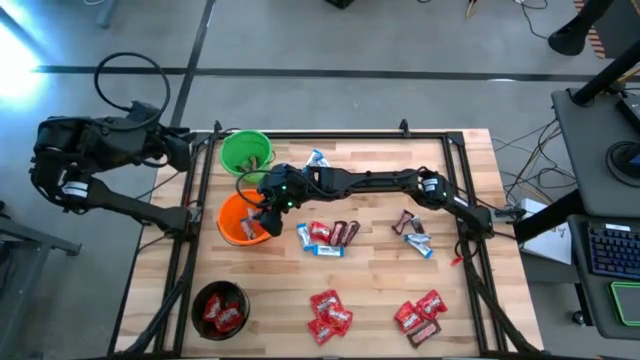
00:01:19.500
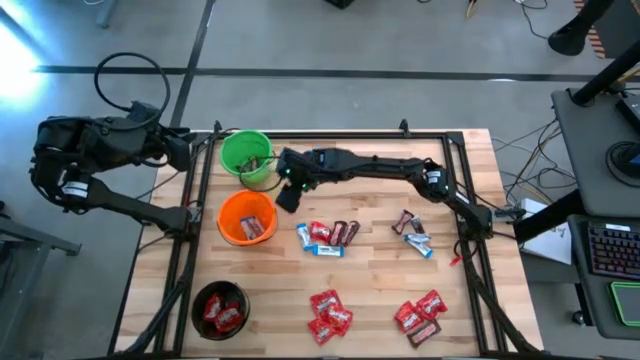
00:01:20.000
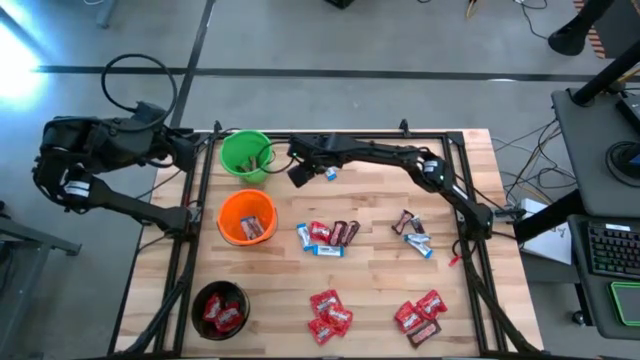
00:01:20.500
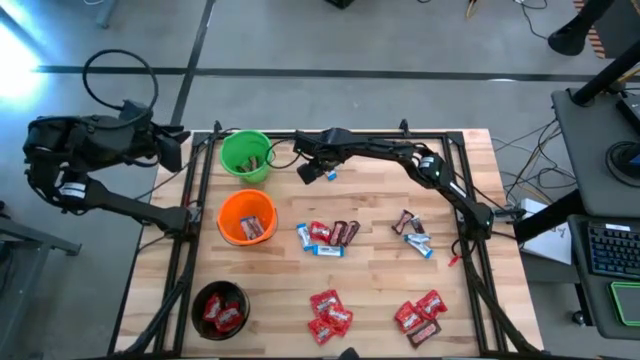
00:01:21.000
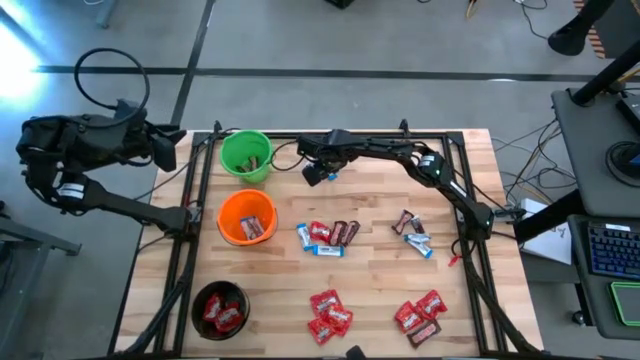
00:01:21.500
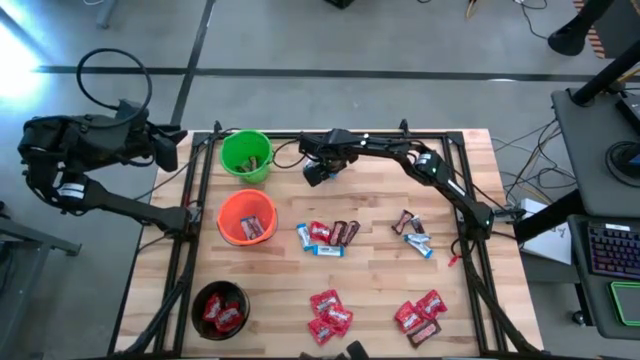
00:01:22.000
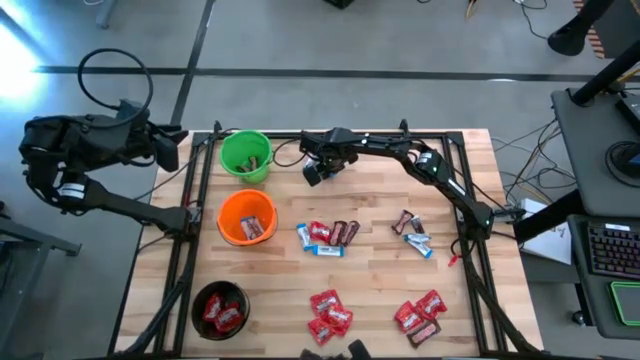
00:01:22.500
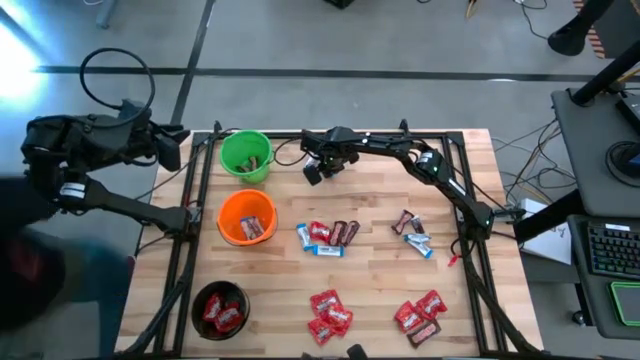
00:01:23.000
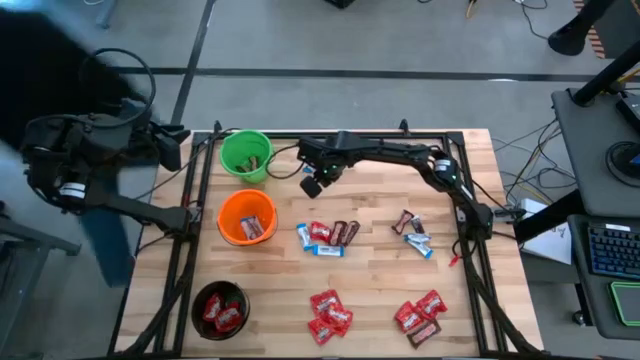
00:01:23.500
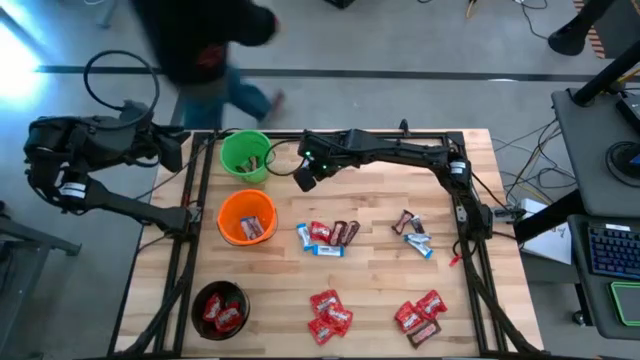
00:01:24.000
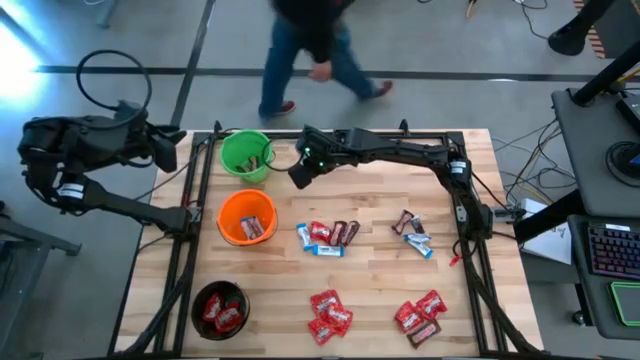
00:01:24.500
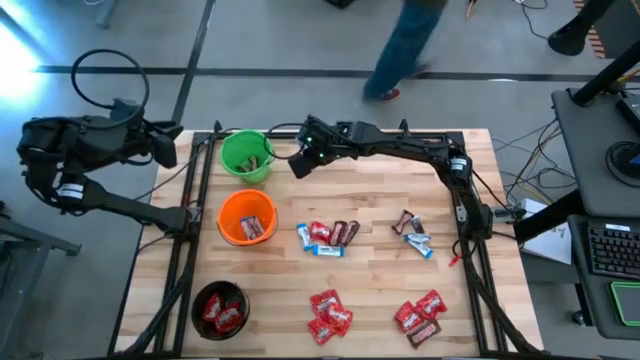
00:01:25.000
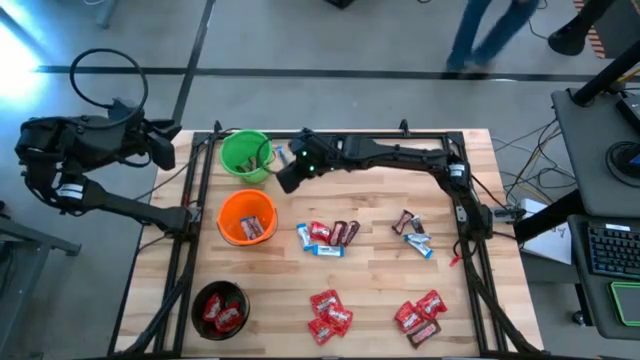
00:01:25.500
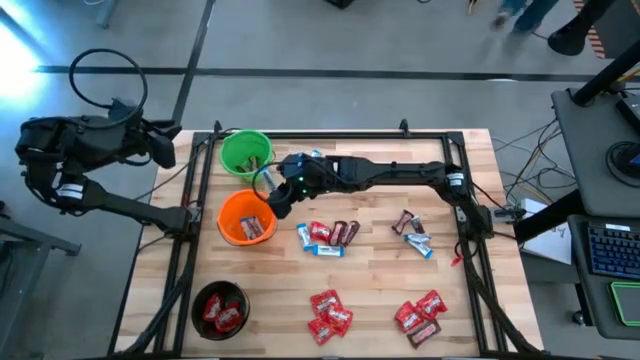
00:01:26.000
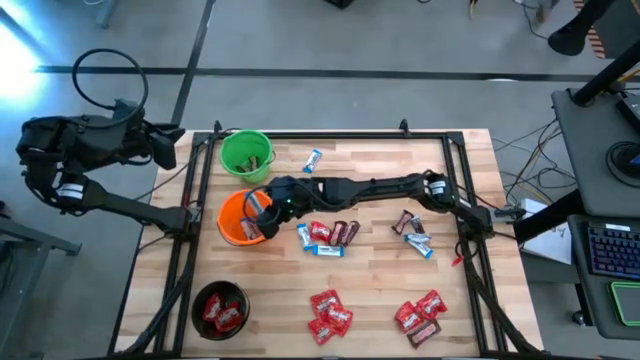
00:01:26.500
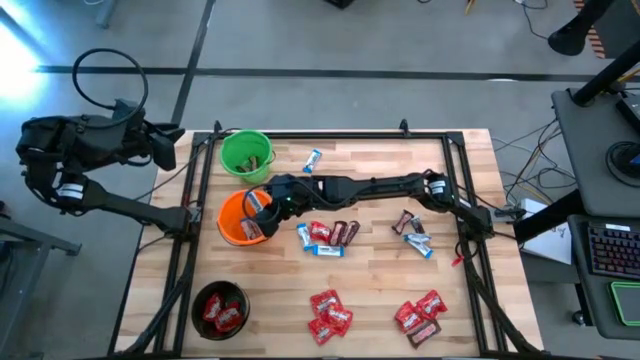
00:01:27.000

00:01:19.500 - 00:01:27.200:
Task: Organize candy in baskets
Put the white chocolate into the orange bucket

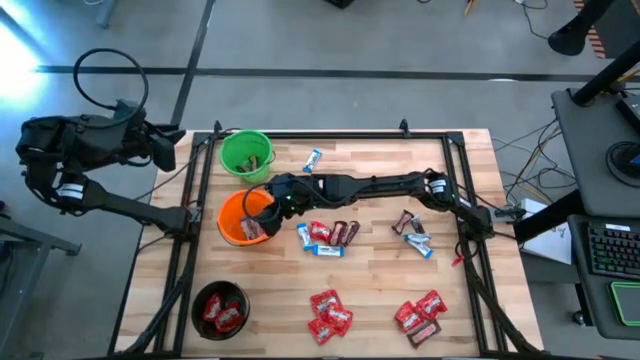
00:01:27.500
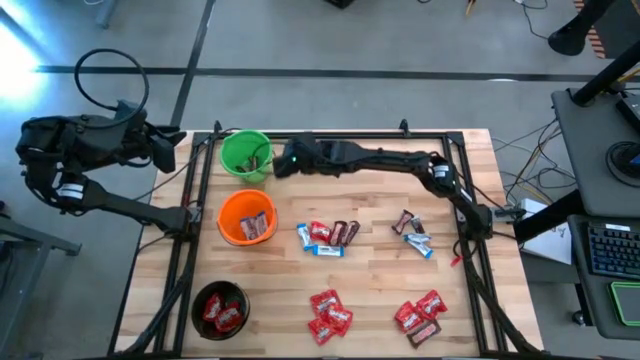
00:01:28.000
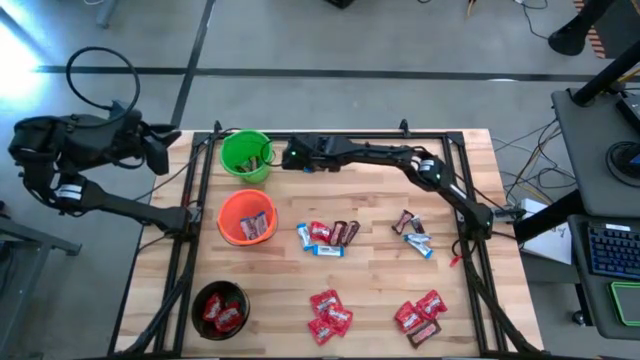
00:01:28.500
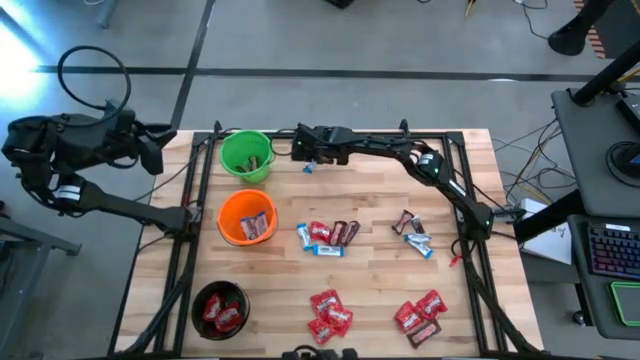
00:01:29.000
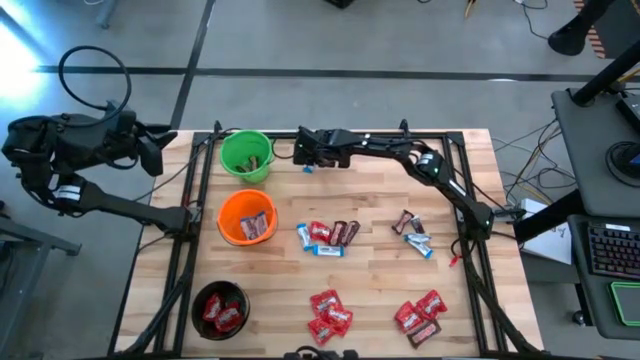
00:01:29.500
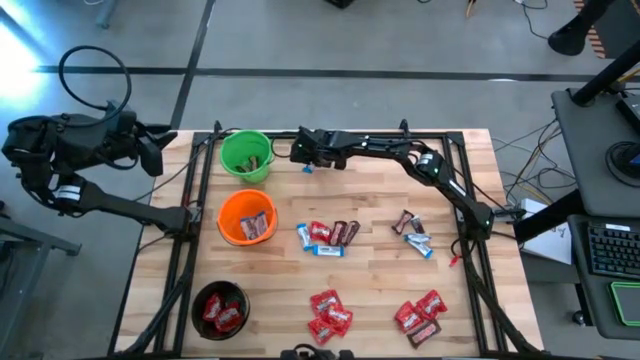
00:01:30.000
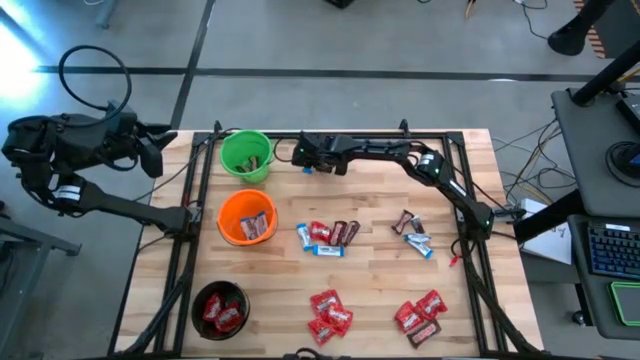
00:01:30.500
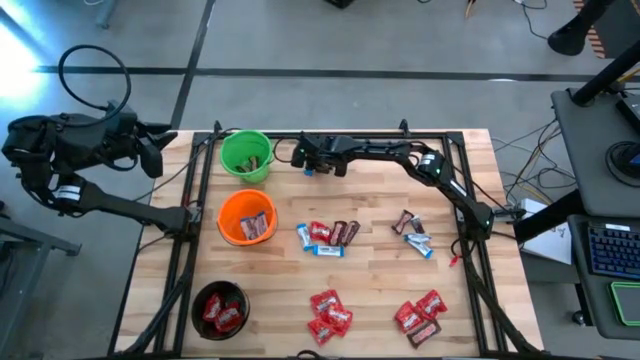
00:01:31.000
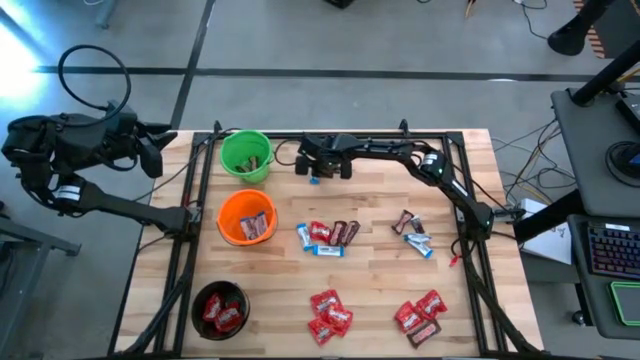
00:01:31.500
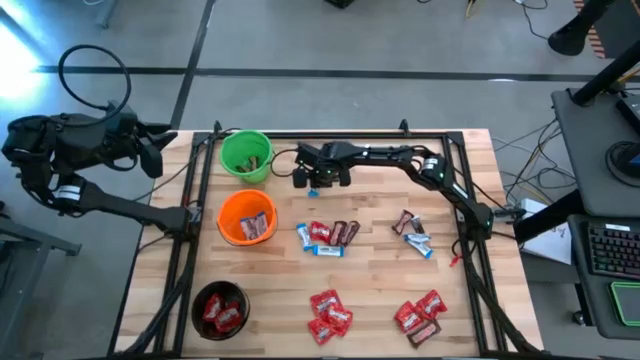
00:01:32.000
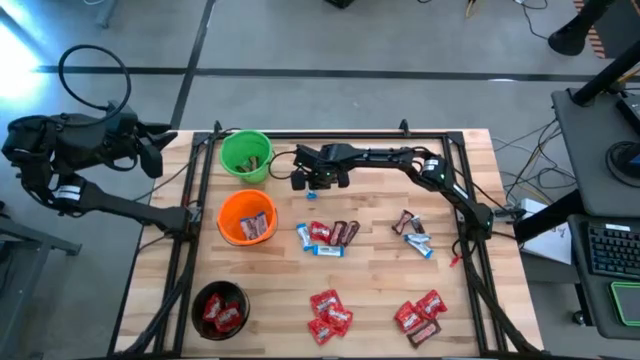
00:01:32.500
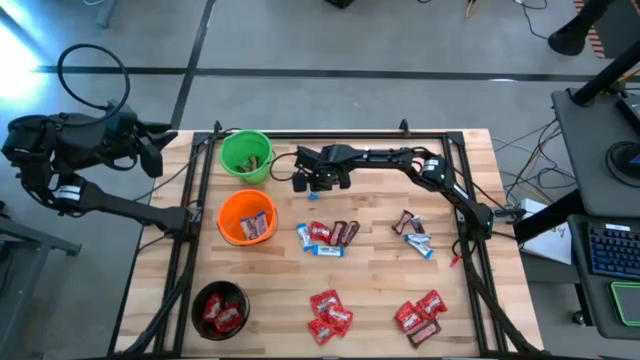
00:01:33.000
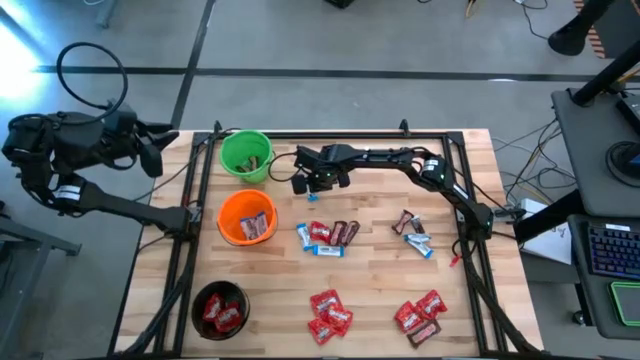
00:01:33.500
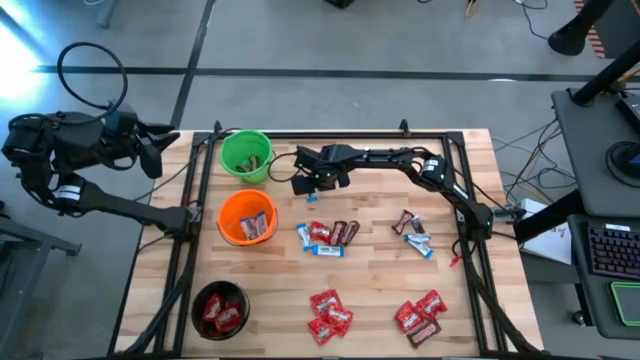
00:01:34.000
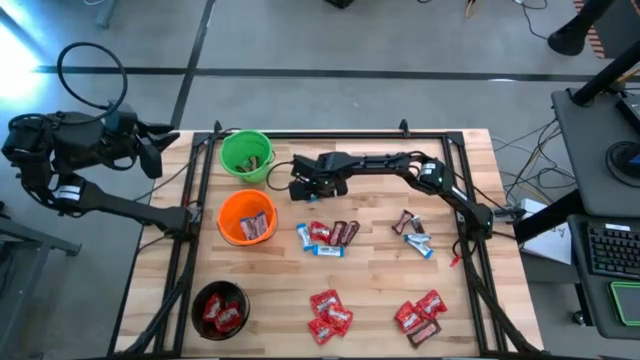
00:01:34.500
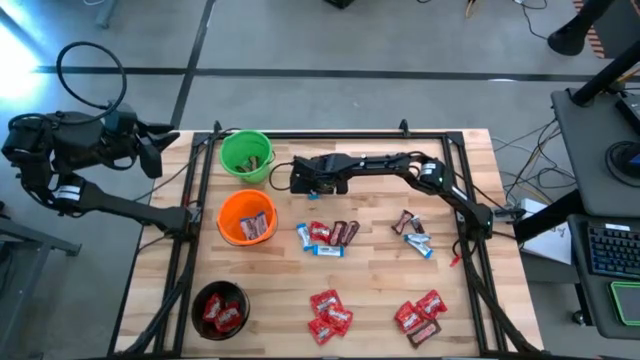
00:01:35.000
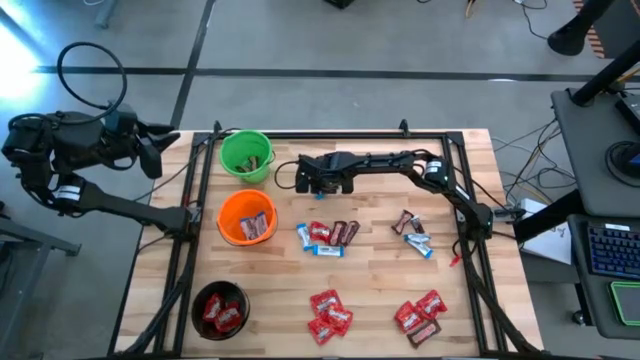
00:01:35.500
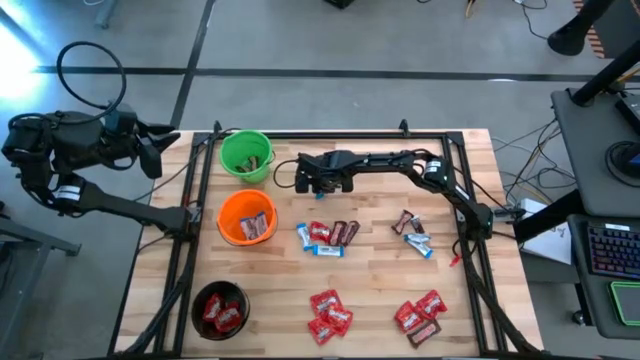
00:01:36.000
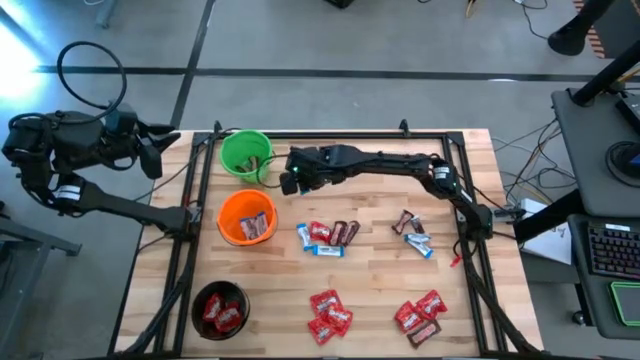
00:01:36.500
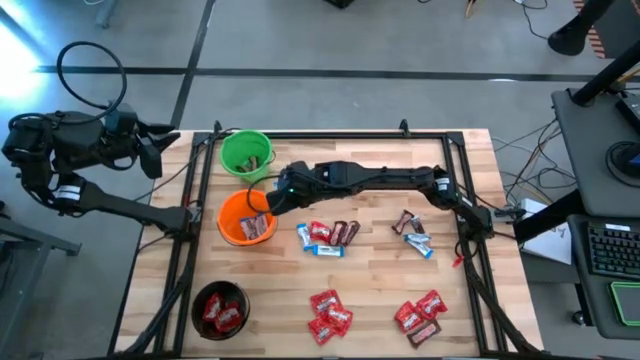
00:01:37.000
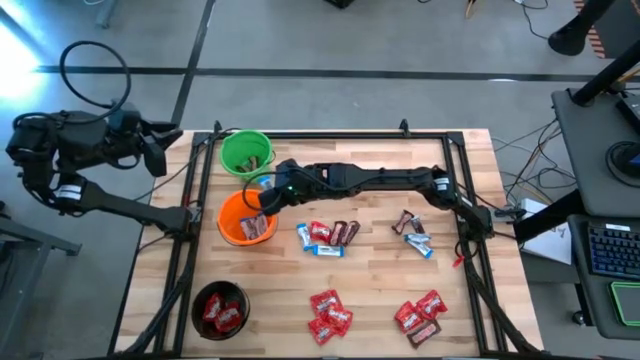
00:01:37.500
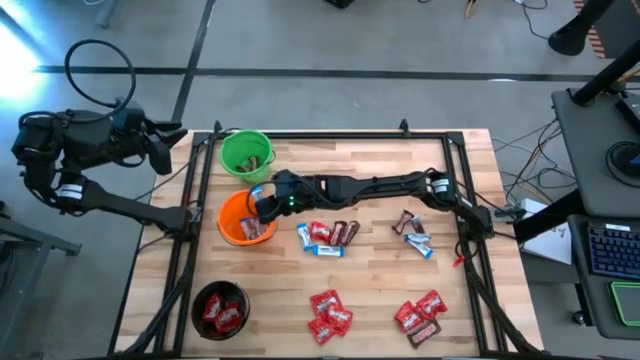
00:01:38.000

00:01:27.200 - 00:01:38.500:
Put the white chocolate into the orange bucket

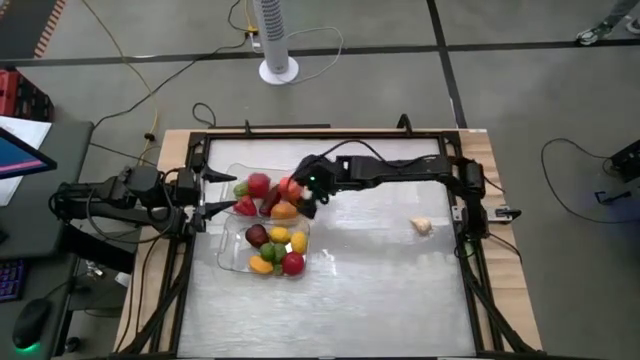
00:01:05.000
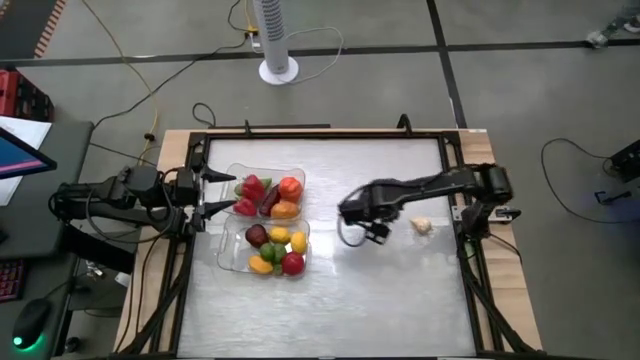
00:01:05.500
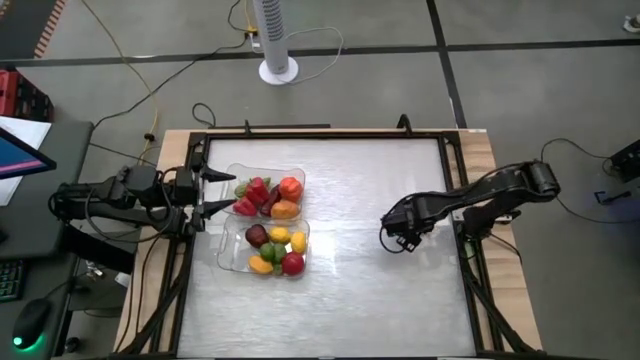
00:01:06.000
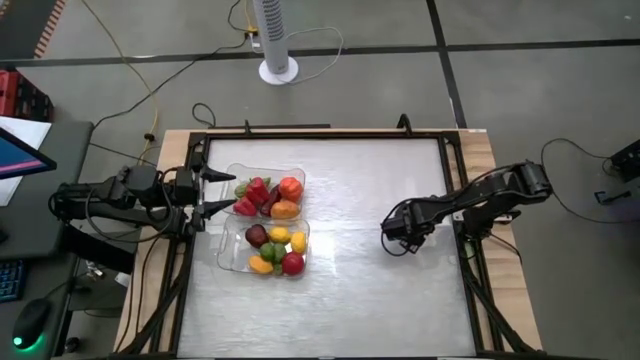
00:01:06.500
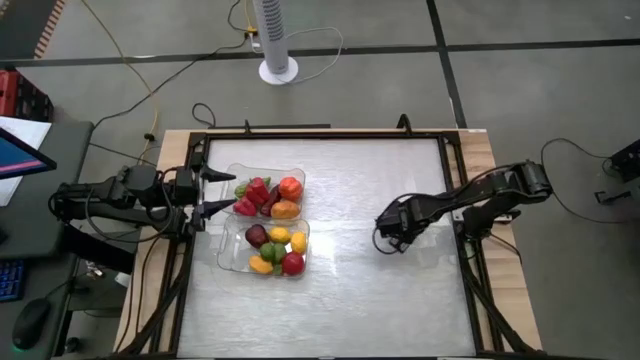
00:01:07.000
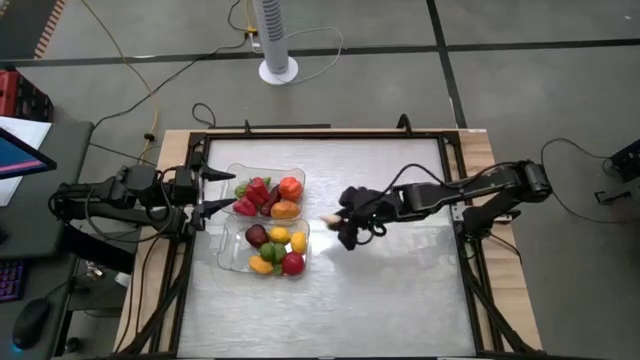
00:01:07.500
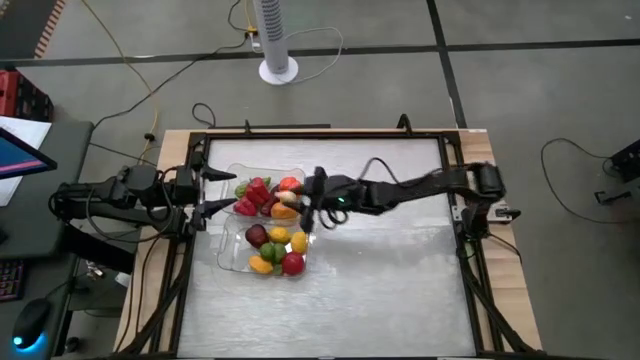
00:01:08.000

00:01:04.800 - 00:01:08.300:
Task: Sort produce into baskets
Put the white garlic into the top transparent bin
